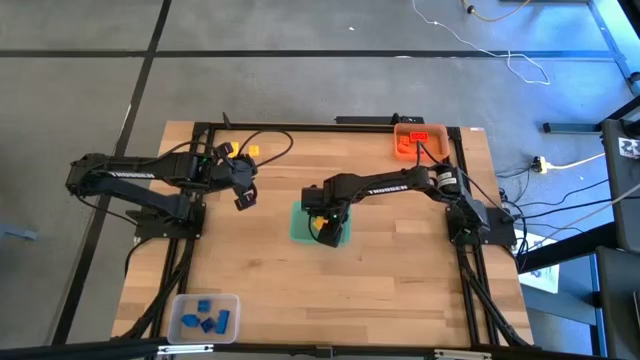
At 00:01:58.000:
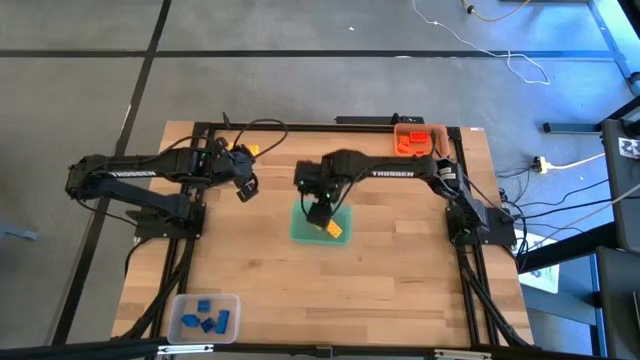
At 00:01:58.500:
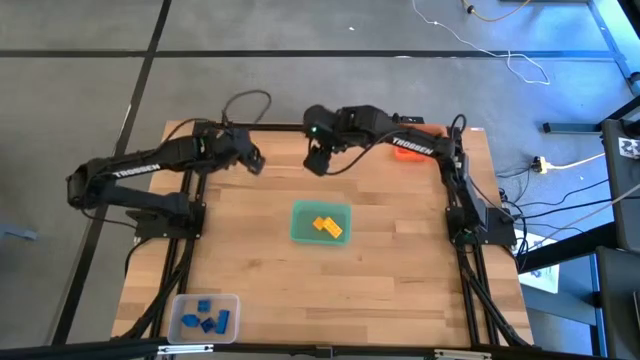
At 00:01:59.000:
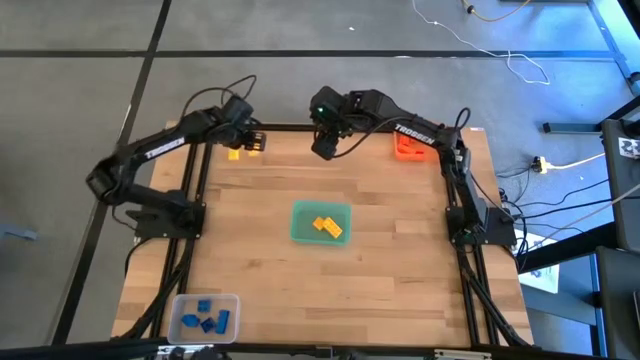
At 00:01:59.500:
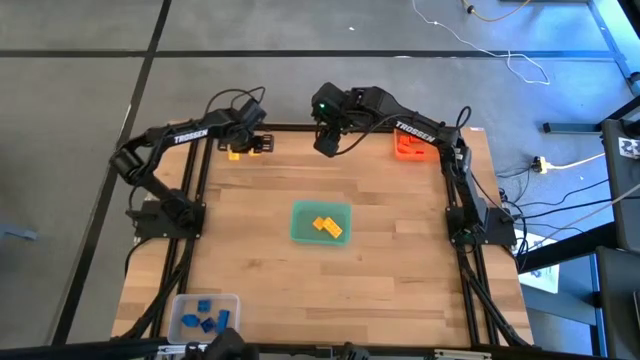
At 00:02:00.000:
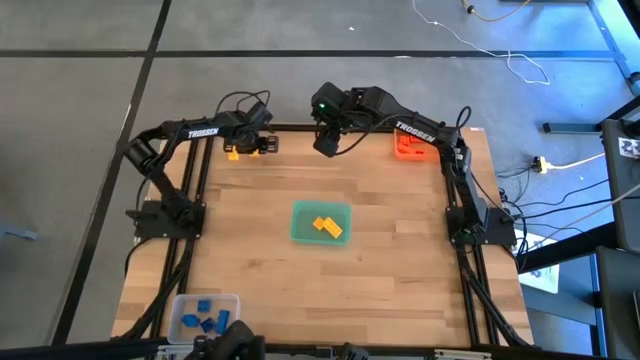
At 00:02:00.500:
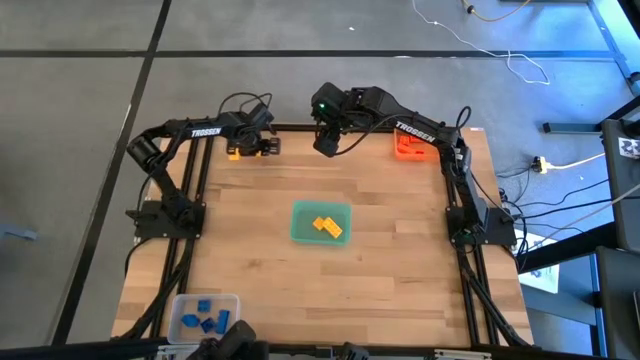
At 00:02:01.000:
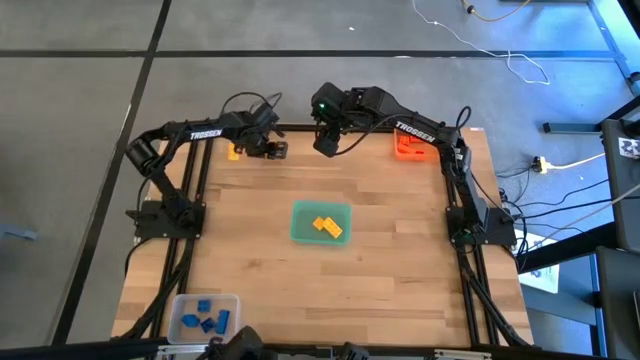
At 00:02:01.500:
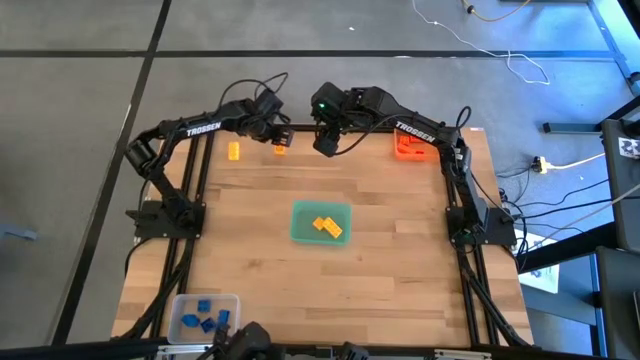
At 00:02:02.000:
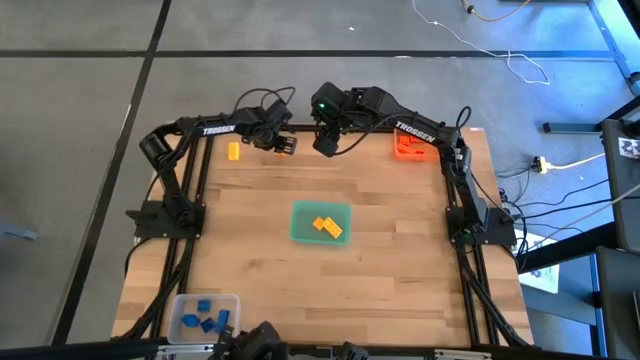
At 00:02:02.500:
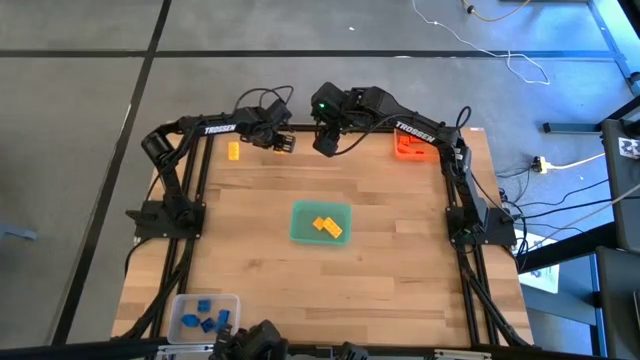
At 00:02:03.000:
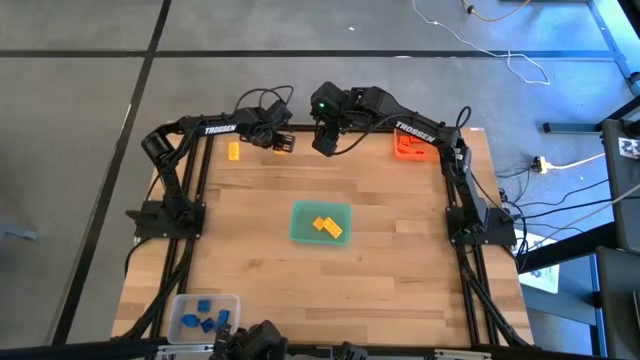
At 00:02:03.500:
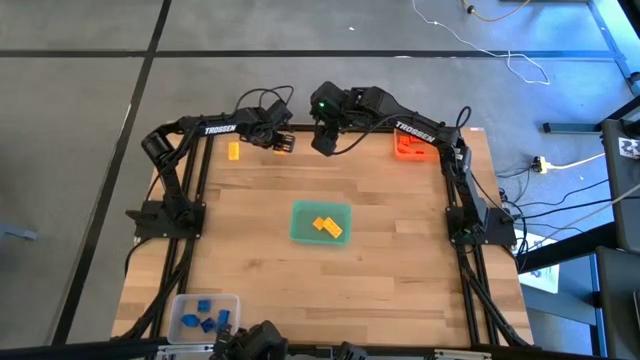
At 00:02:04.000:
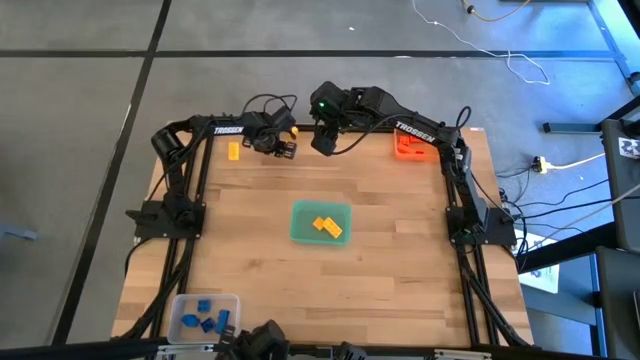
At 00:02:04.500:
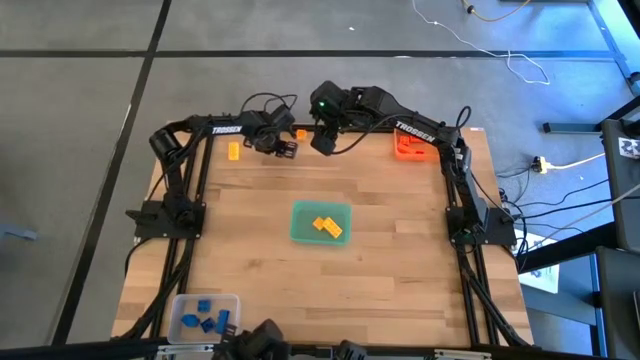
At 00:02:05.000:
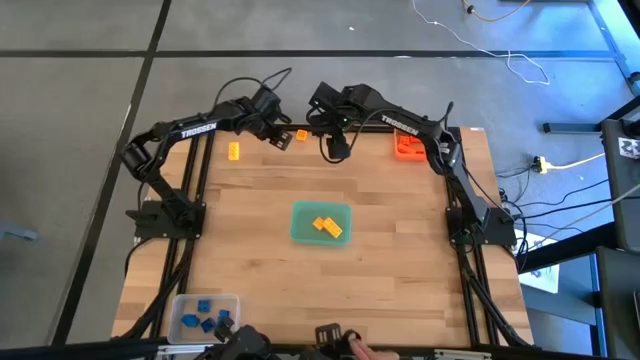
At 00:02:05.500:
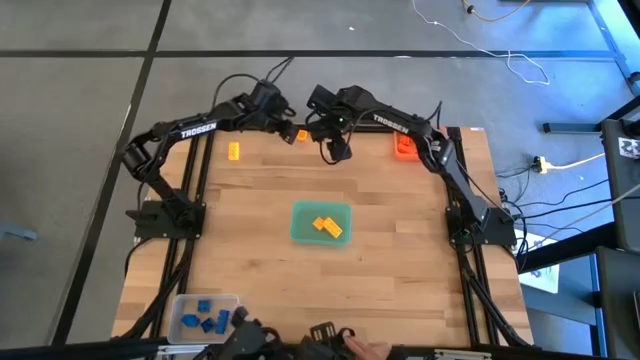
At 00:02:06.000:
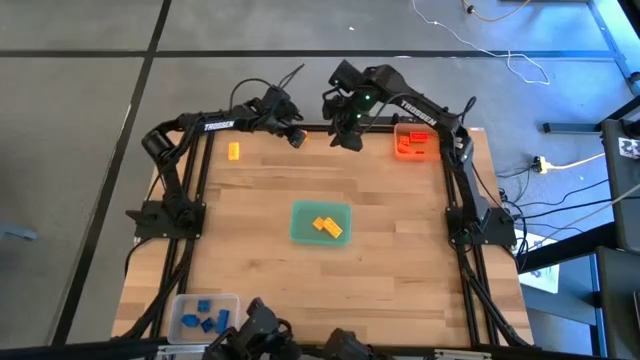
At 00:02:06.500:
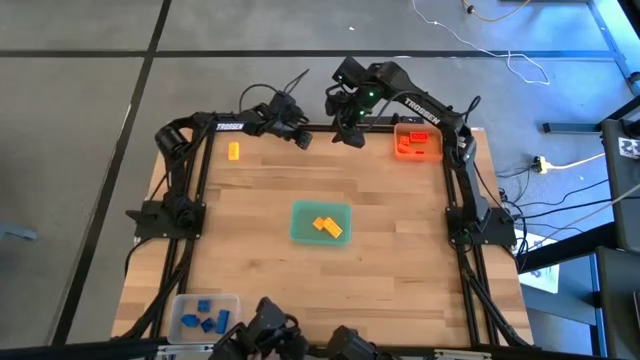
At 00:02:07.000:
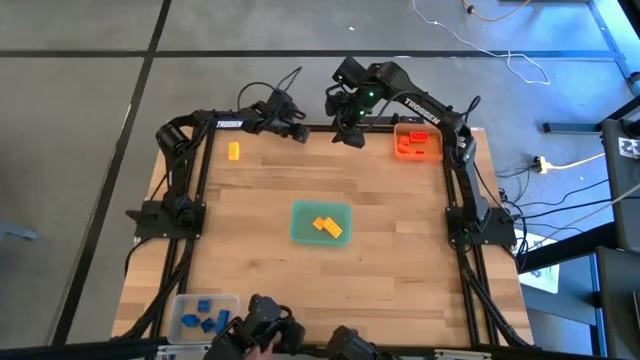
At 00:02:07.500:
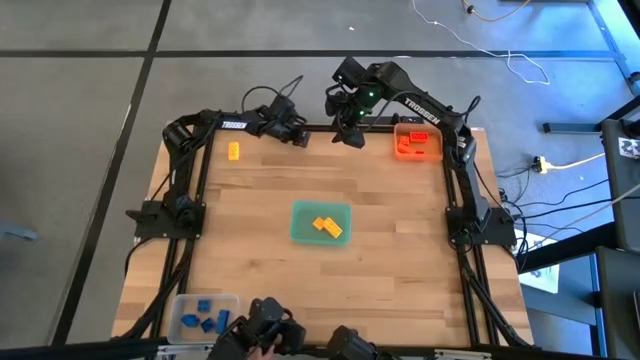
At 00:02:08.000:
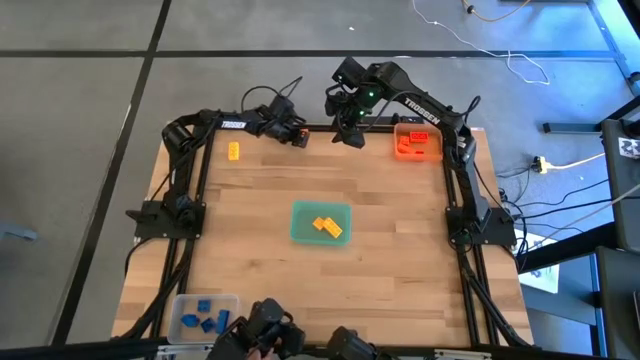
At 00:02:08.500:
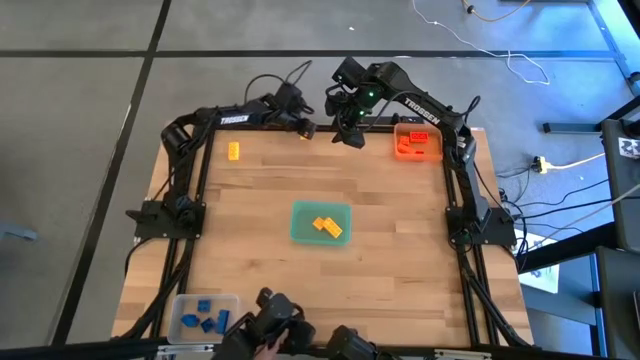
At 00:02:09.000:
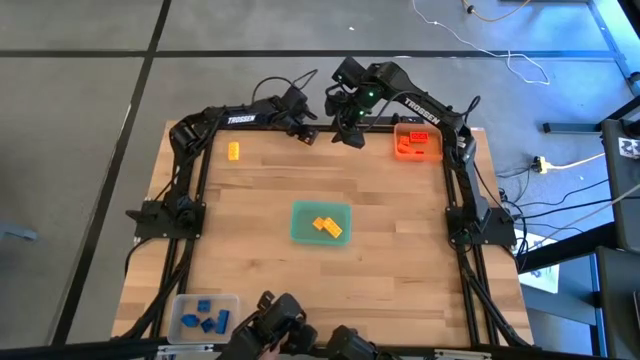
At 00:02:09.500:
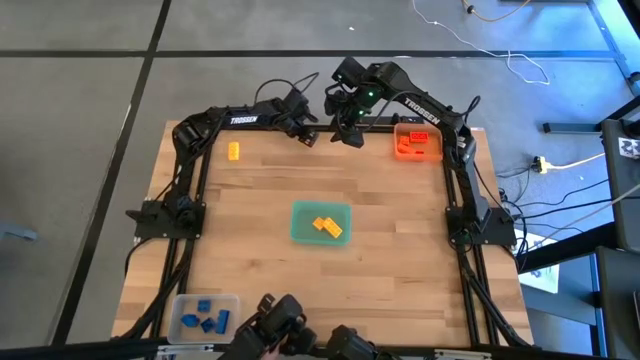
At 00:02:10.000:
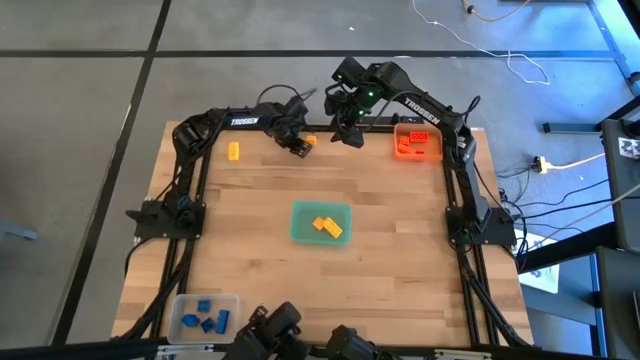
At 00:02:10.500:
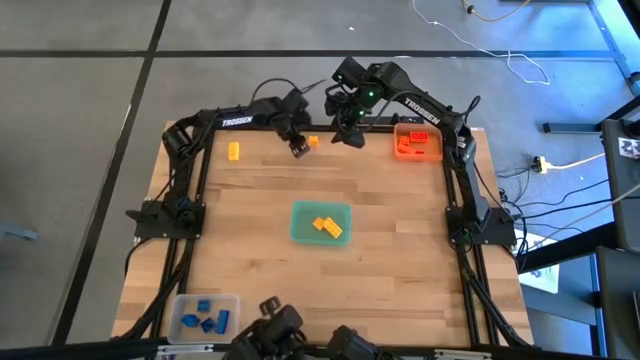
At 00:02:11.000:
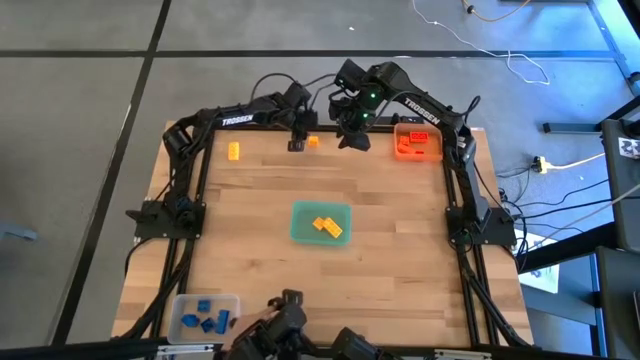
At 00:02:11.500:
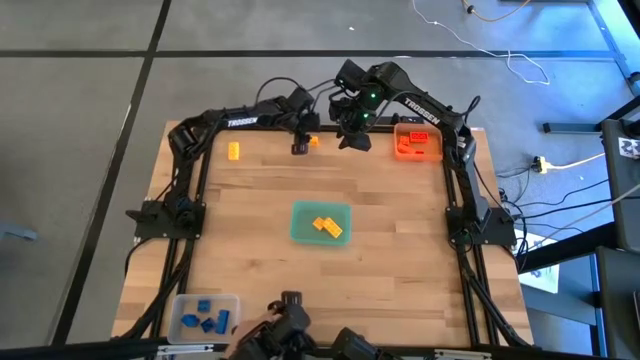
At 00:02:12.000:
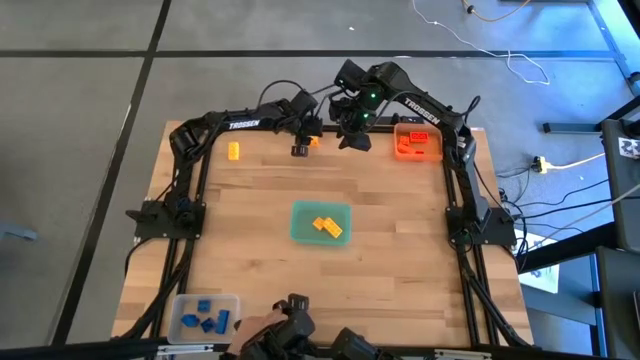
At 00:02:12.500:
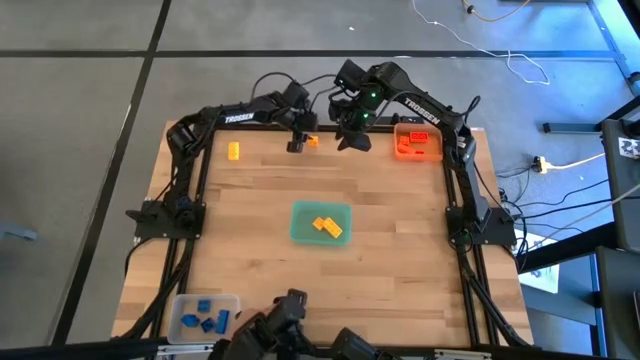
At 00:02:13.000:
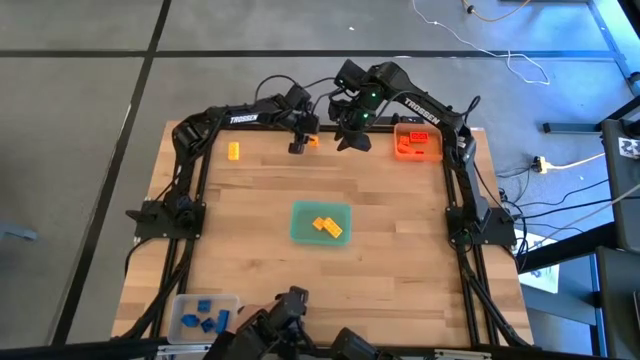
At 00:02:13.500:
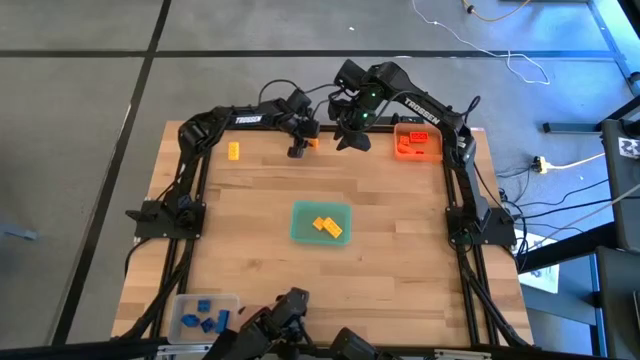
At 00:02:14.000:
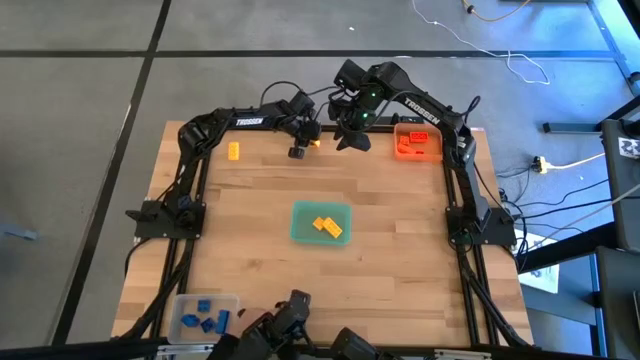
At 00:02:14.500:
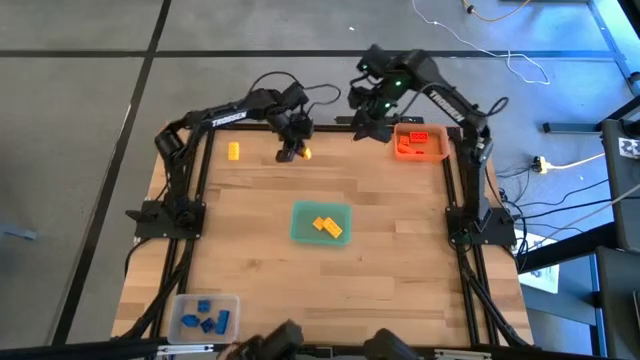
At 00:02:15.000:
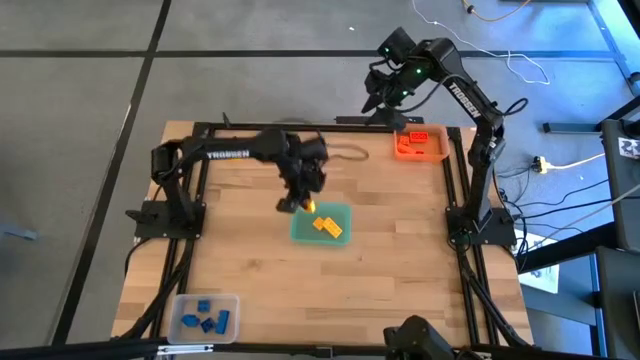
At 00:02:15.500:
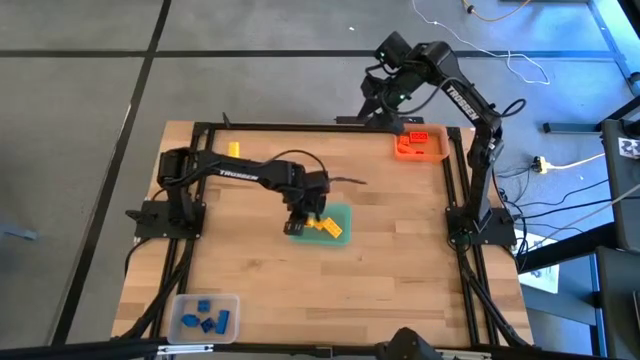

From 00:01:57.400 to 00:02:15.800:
Task: Sort & place blocks by color
Put the yellow game piece into the blue bin

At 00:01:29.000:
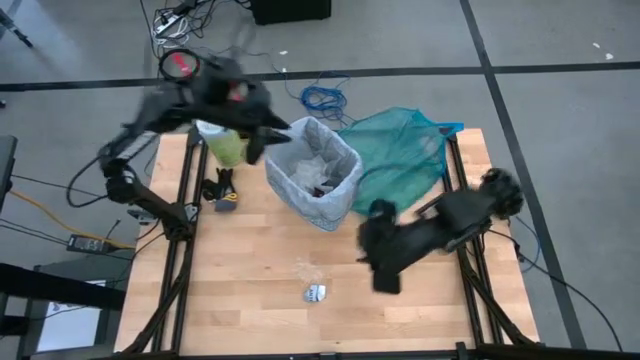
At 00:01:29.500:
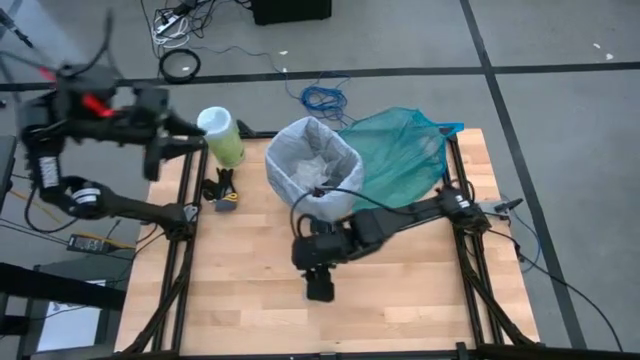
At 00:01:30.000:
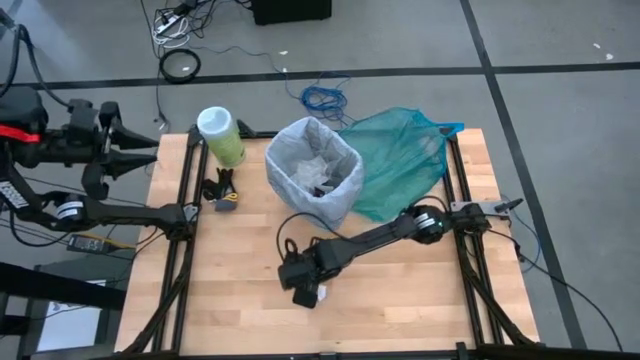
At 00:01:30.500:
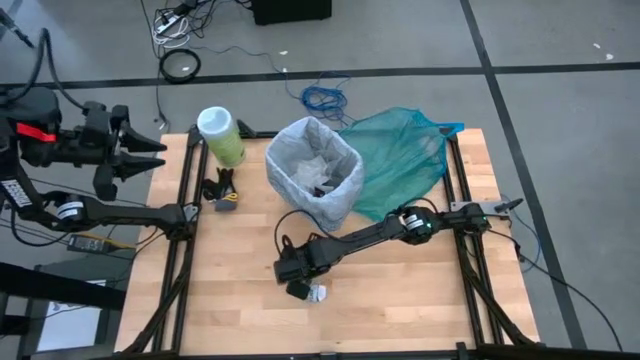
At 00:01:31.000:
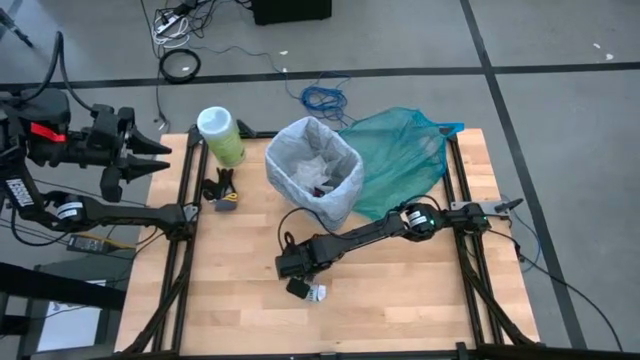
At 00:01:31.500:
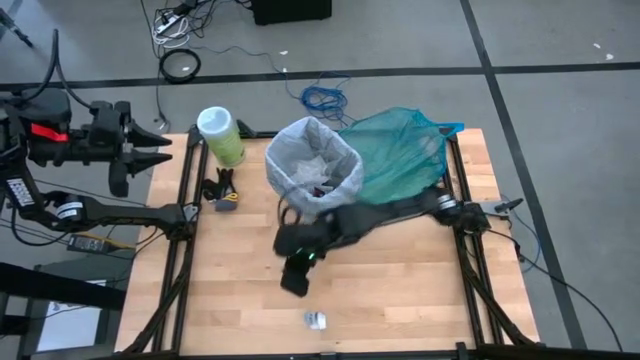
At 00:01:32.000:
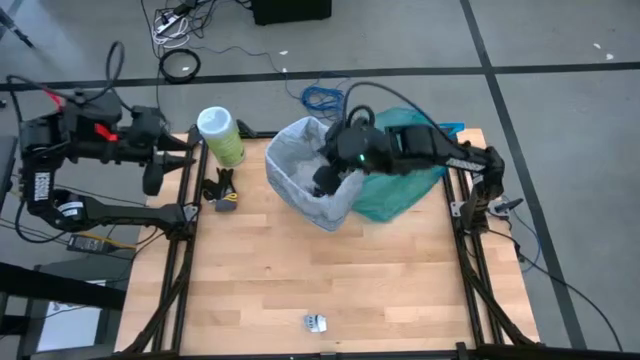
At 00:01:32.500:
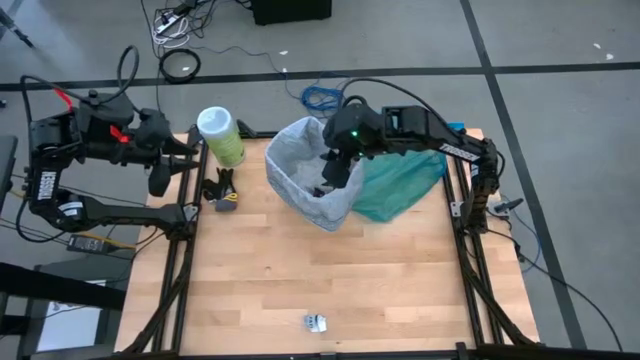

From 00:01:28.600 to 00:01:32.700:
Task: place trash/remove bag and relplace
Put the transparent plastic into the trash bin
